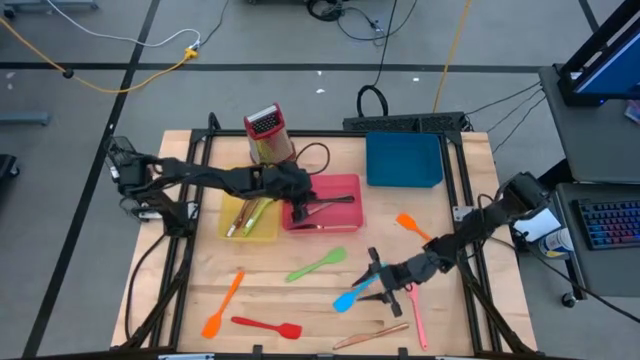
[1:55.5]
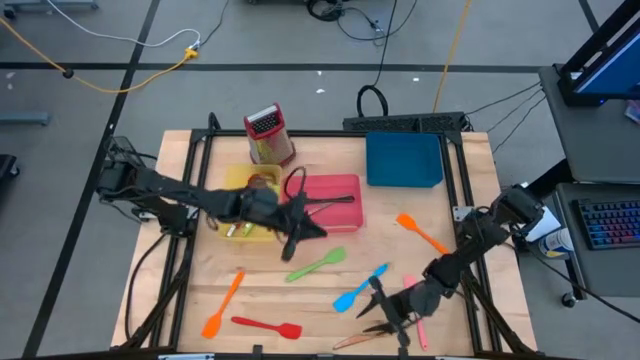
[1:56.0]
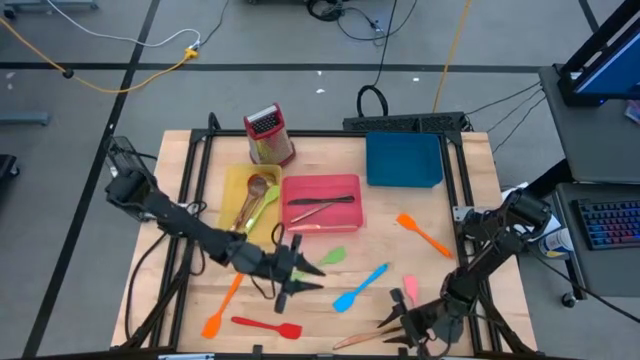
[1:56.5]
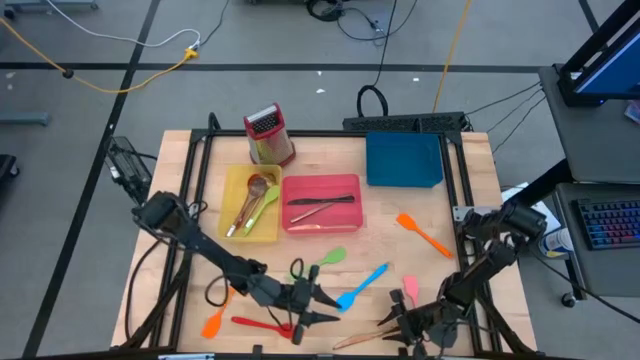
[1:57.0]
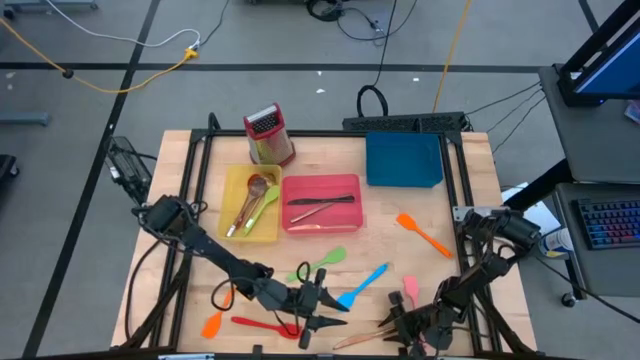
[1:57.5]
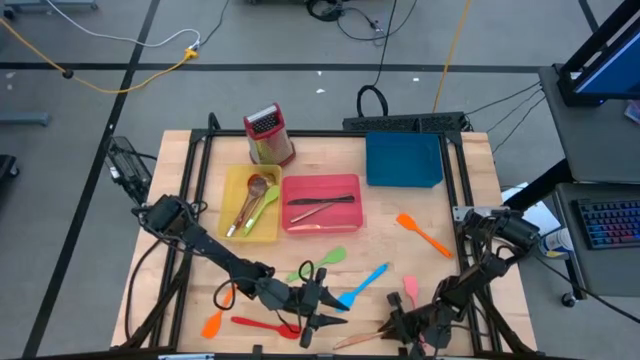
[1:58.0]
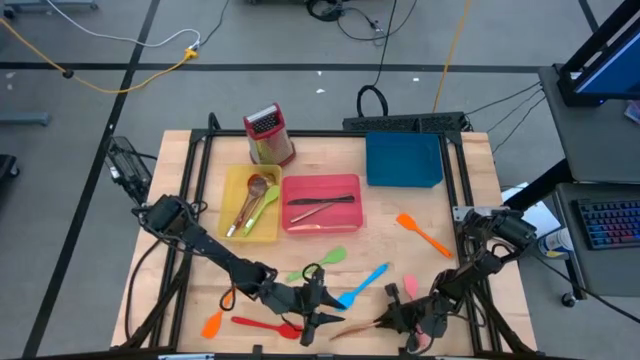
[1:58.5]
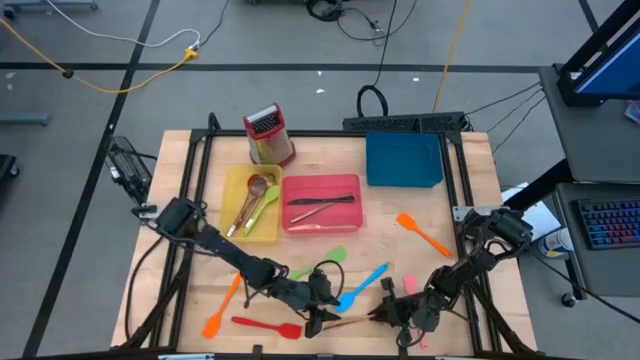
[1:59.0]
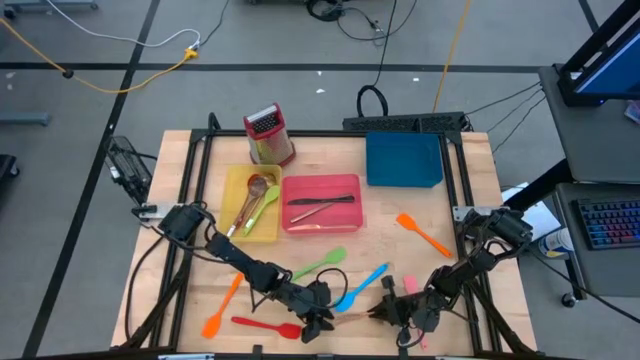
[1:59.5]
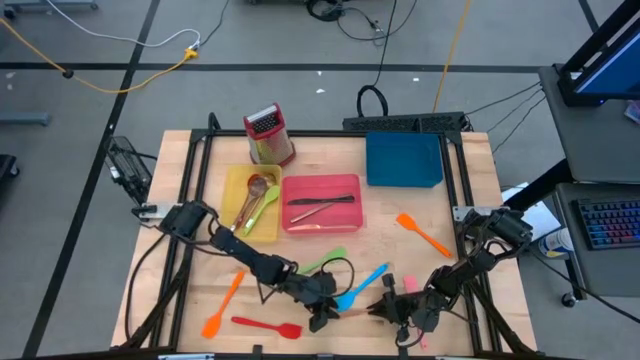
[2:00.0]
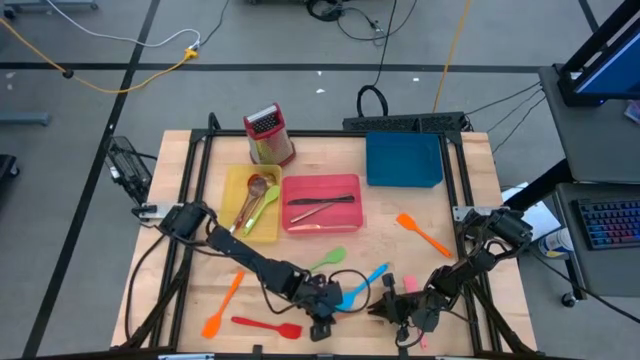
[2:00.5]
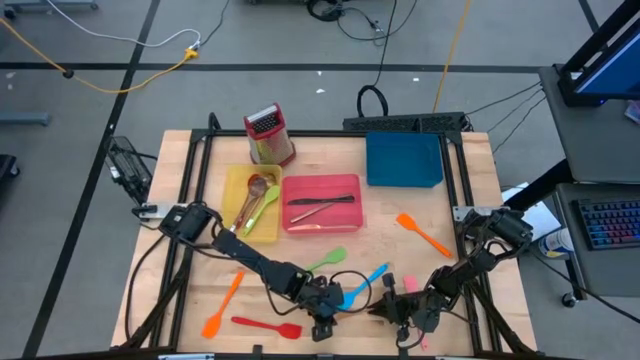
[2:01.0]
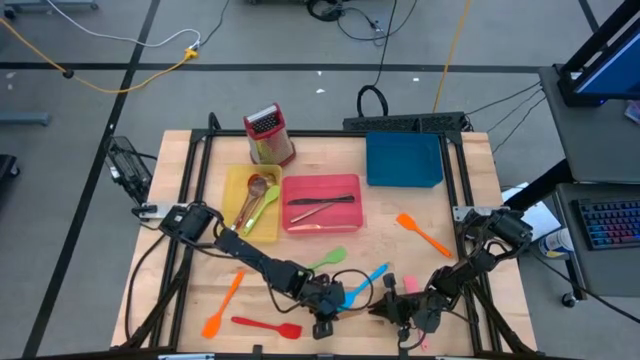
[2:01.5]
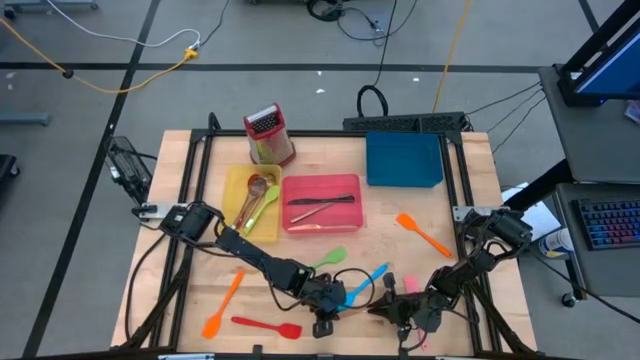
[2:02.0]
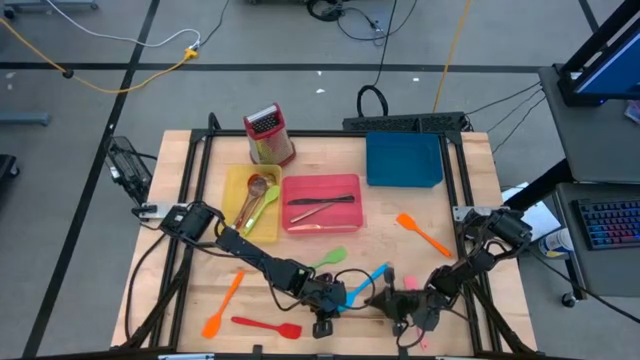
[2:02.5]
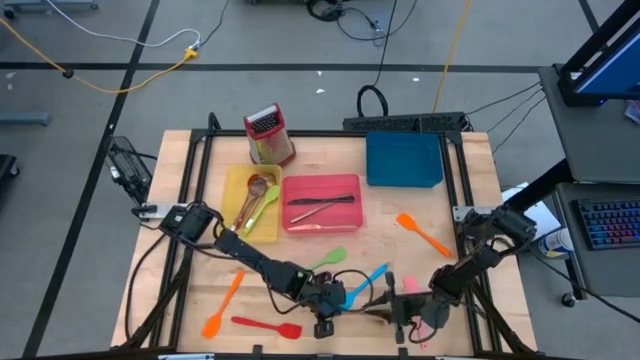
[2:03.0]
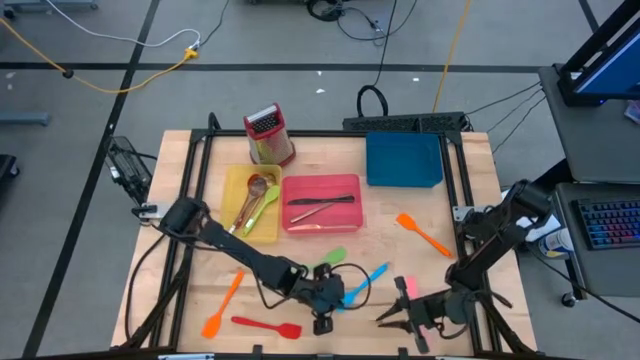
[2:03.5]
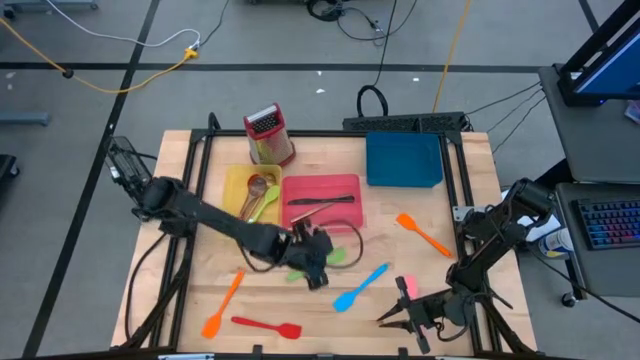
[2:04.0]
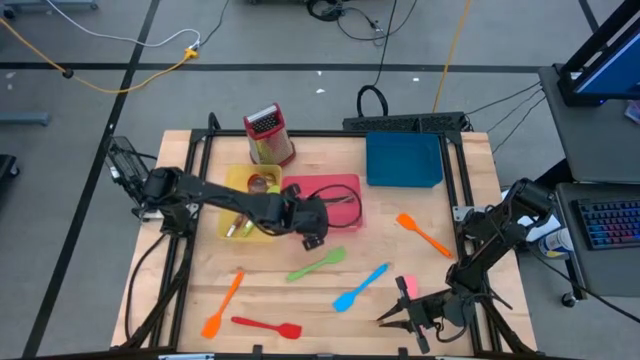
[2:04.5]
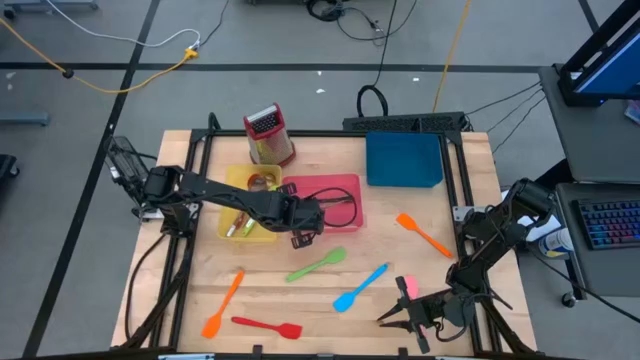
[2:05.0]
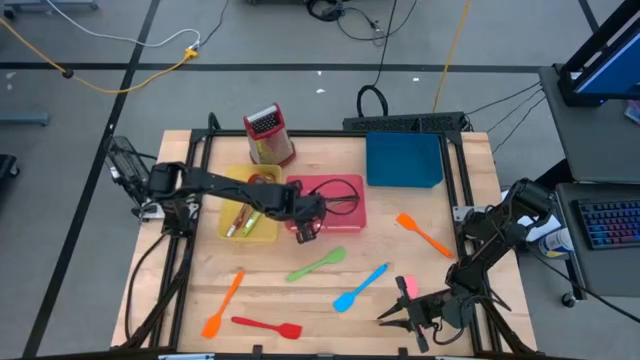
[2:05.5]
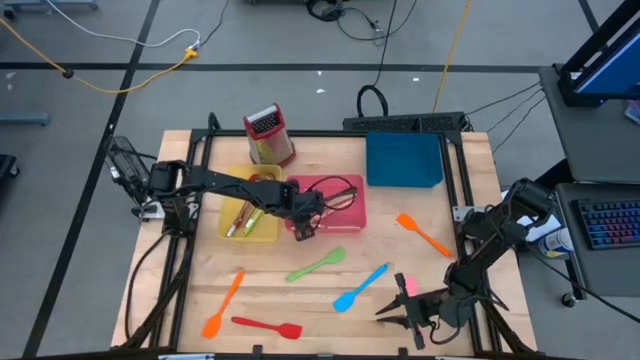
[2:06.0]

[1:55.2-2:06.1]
Task: Pick & Place Kitchen Items
Put the gold table knife into the pink bin

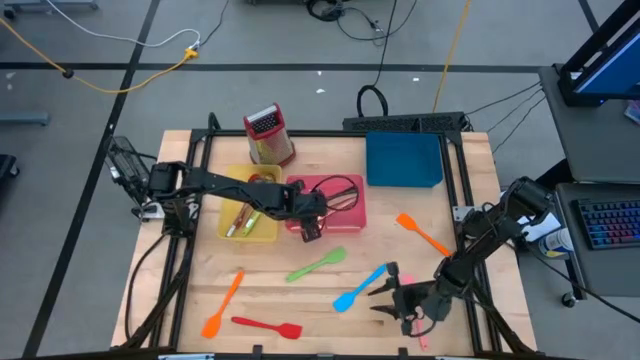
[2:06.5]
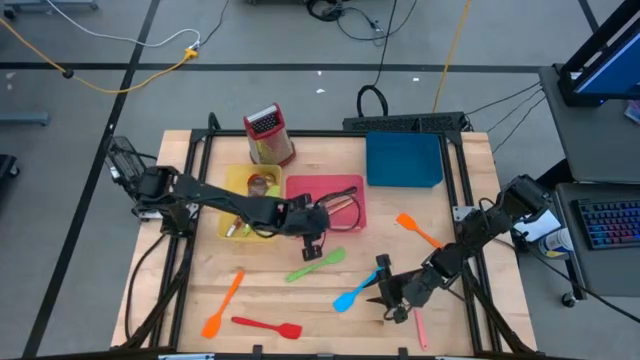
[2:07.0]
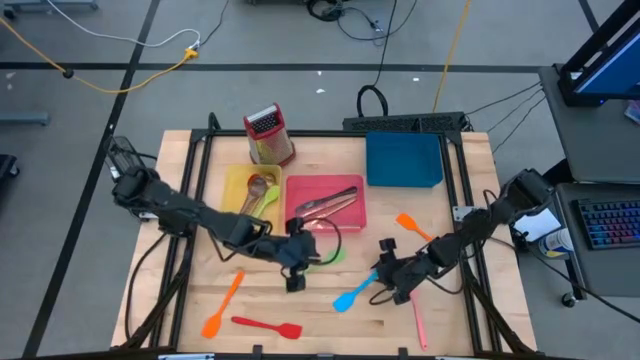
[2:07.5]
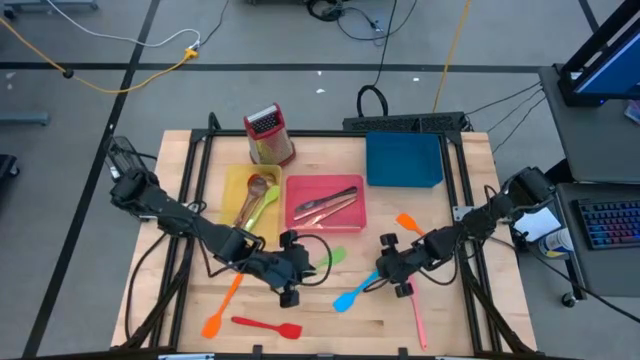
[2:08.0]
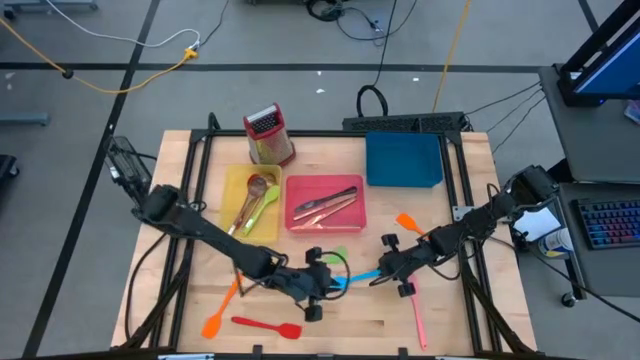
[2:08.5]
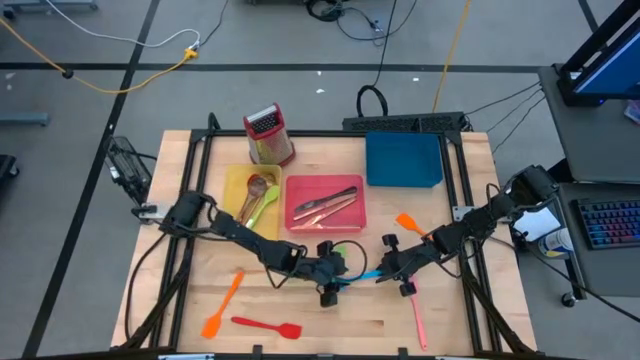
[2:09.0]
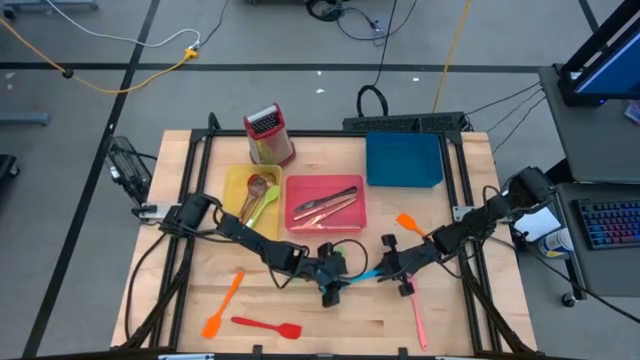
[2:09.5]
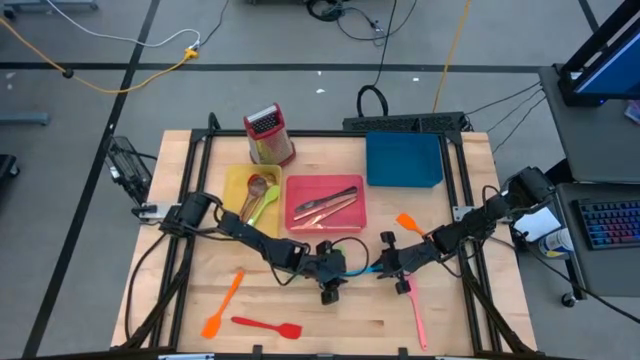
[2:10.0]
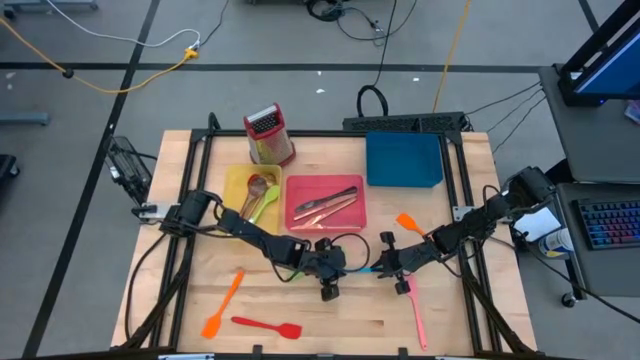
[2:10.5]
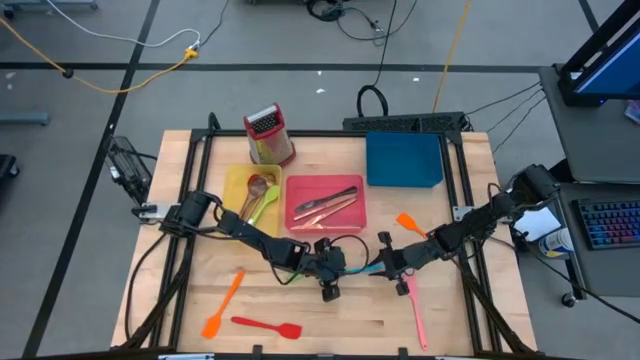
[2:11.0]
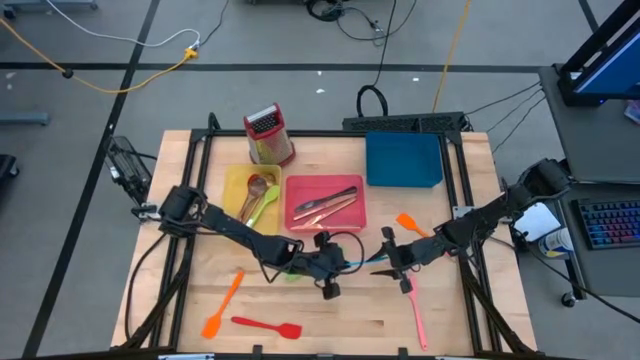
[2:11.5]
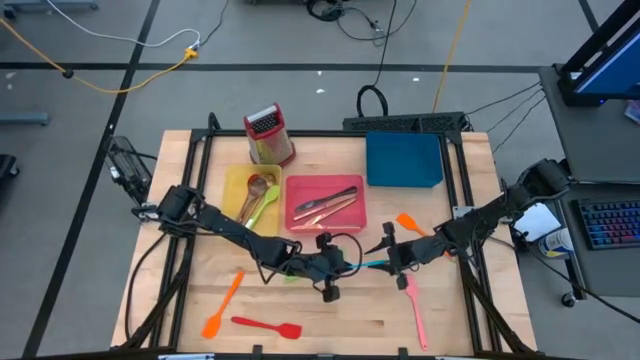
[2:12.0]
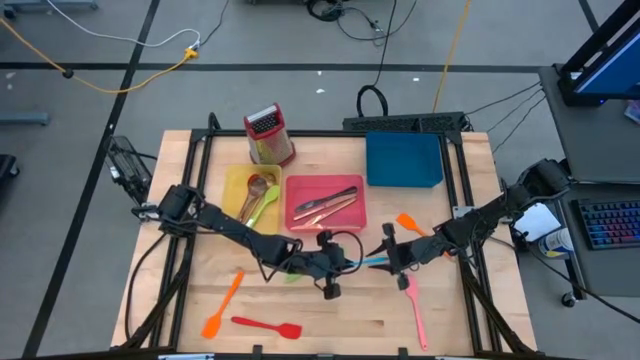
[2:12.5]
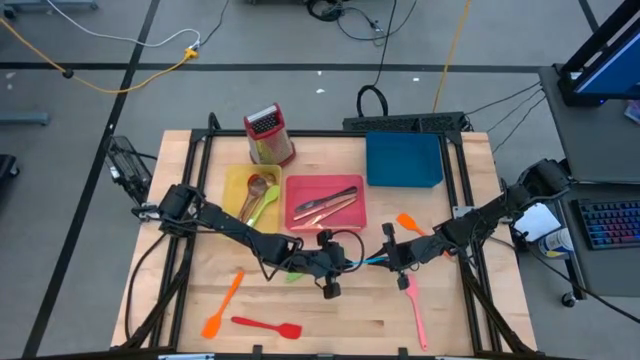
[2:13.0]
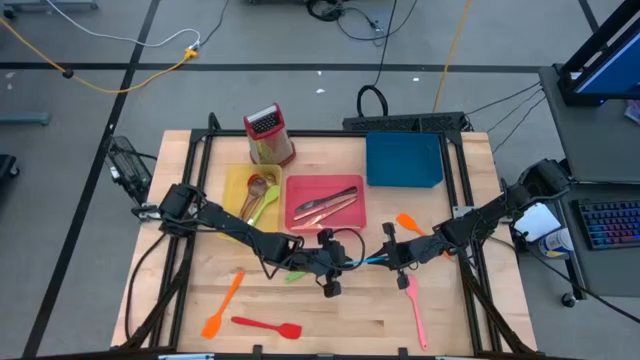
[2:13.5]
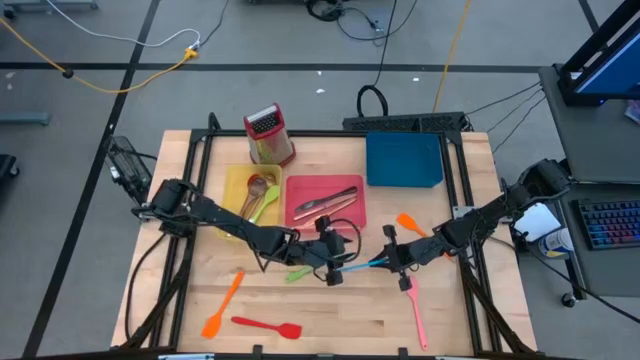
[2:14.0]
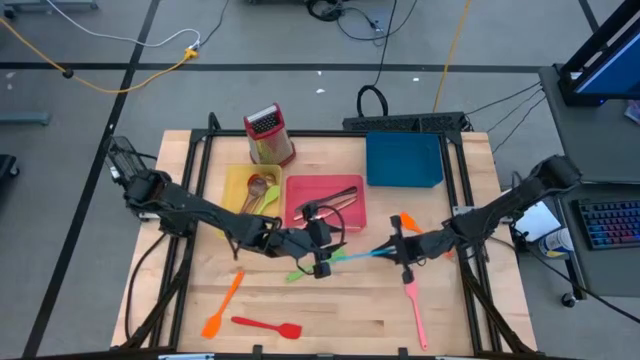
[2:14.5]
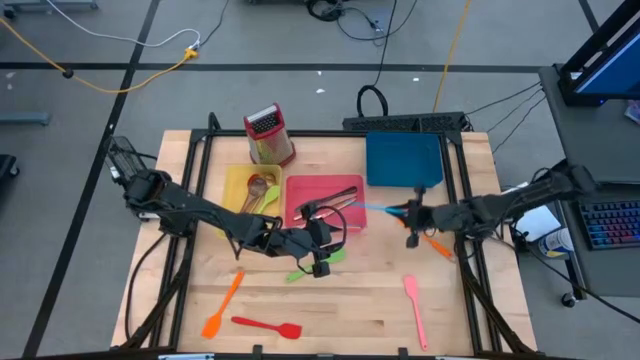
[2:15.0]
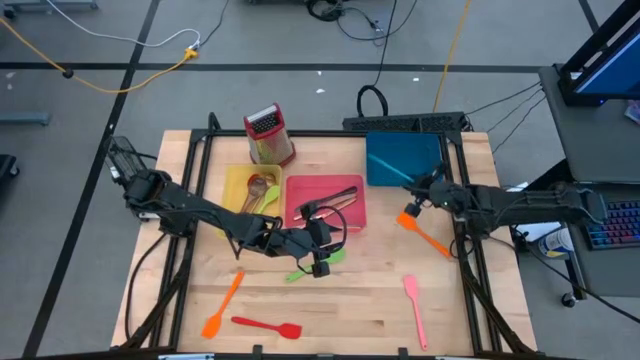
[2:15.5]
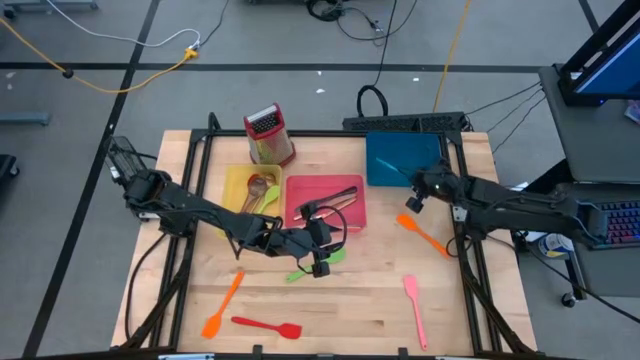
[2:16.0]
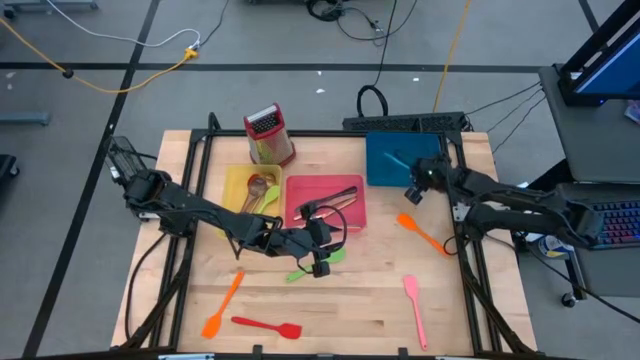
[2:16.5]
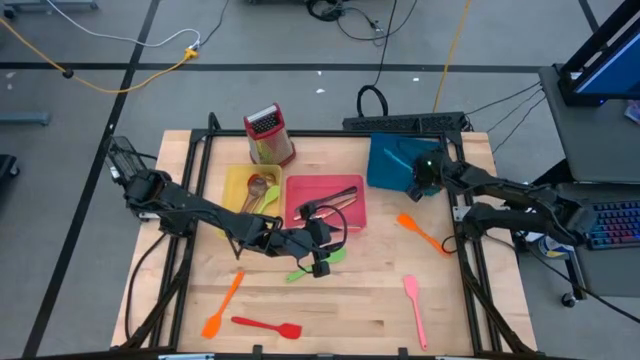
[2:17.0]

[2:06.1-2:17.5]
Put the blue spatula into the blue bin
